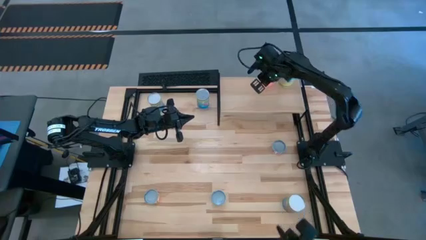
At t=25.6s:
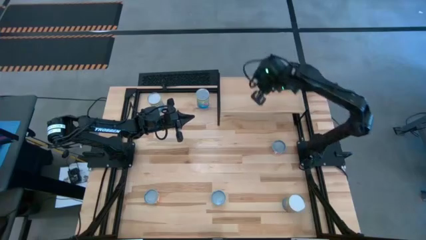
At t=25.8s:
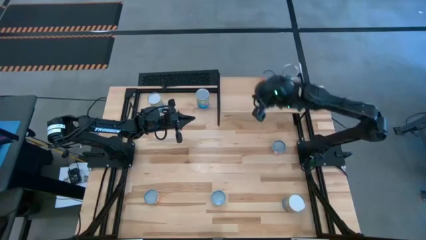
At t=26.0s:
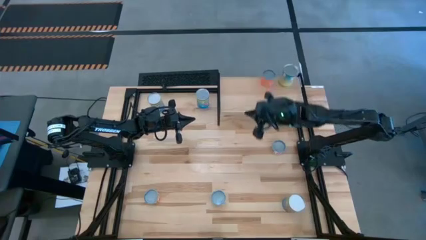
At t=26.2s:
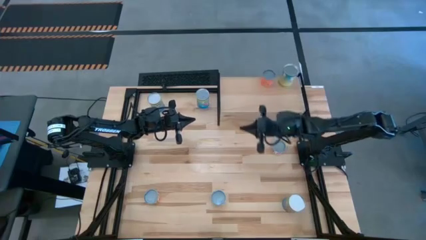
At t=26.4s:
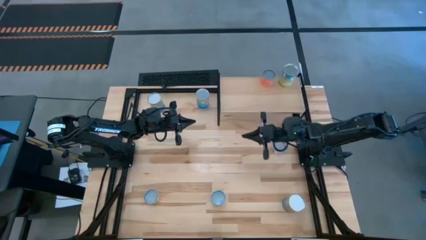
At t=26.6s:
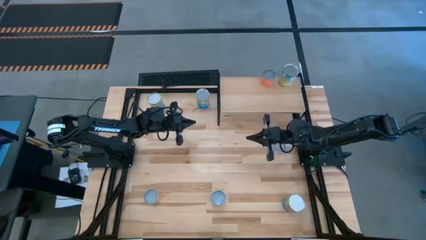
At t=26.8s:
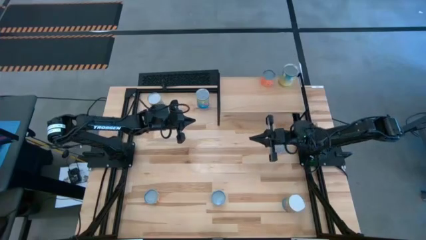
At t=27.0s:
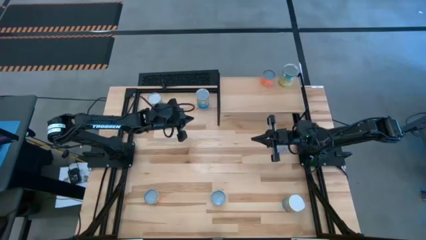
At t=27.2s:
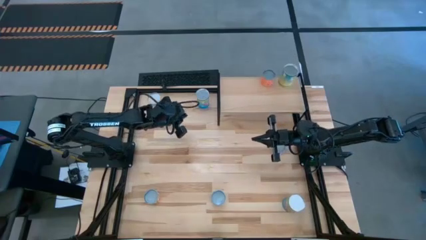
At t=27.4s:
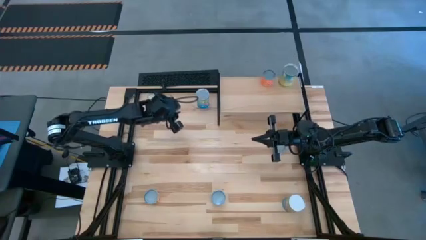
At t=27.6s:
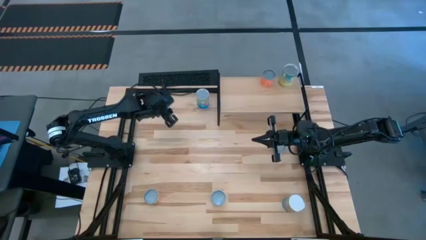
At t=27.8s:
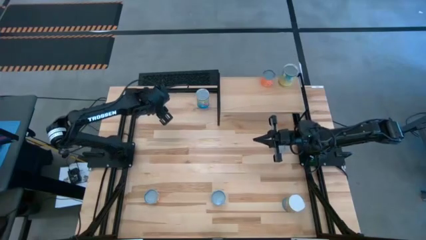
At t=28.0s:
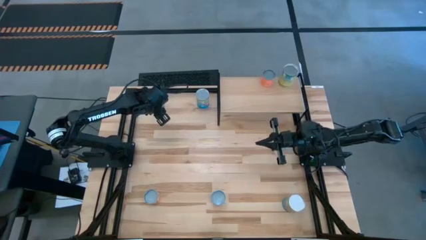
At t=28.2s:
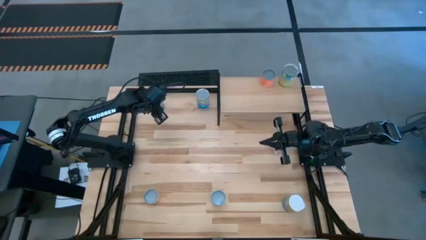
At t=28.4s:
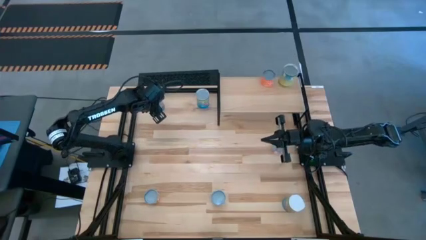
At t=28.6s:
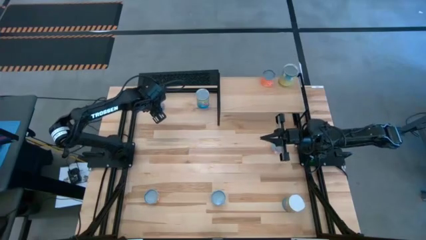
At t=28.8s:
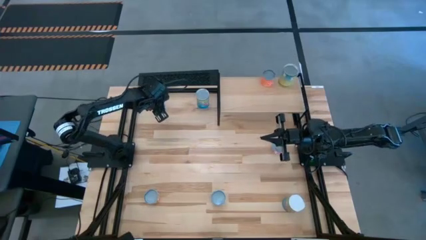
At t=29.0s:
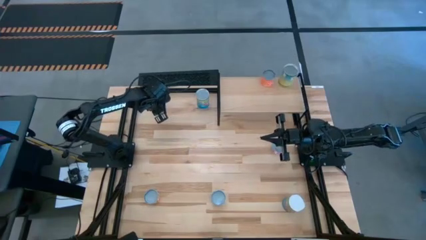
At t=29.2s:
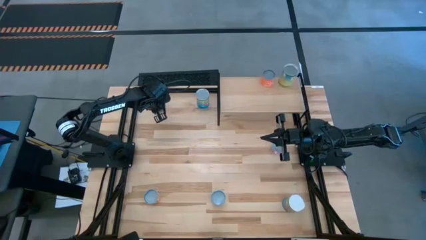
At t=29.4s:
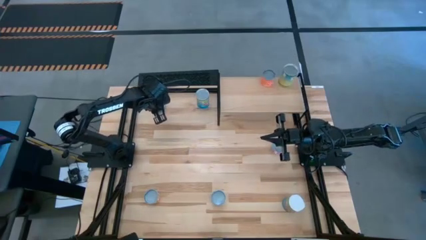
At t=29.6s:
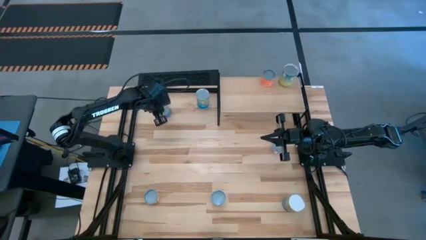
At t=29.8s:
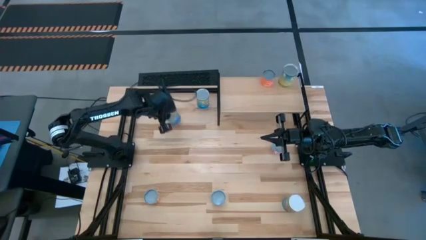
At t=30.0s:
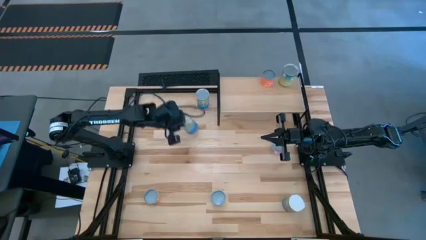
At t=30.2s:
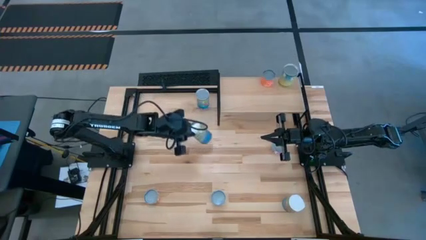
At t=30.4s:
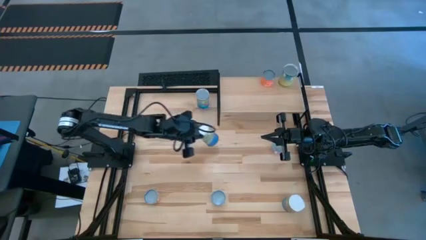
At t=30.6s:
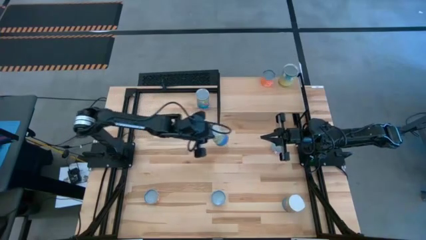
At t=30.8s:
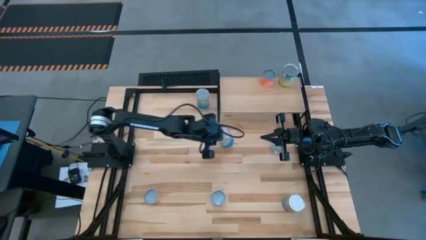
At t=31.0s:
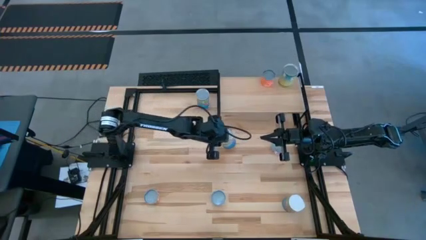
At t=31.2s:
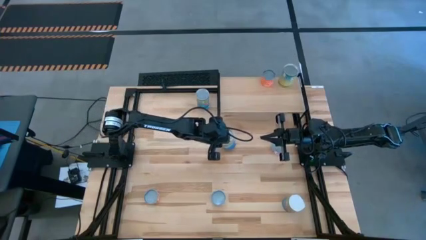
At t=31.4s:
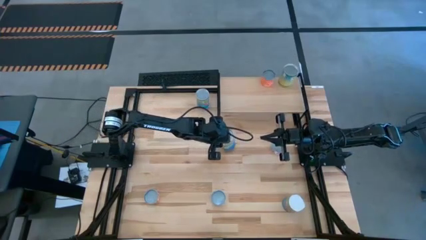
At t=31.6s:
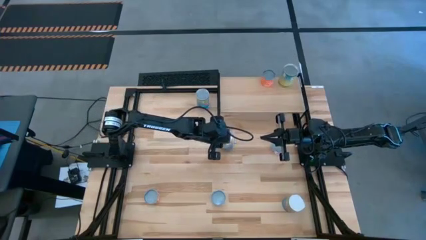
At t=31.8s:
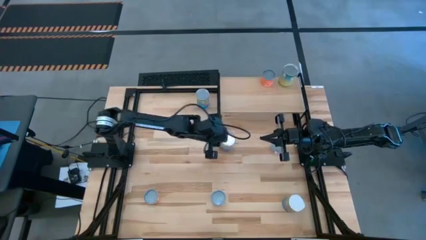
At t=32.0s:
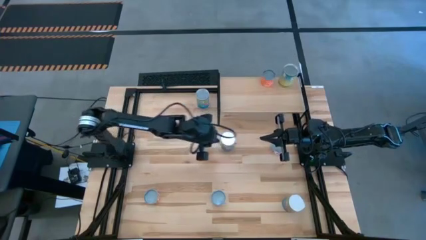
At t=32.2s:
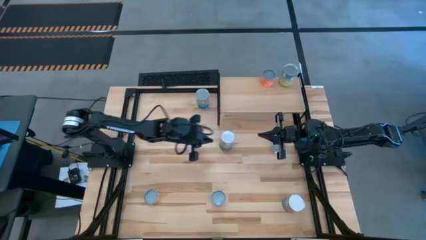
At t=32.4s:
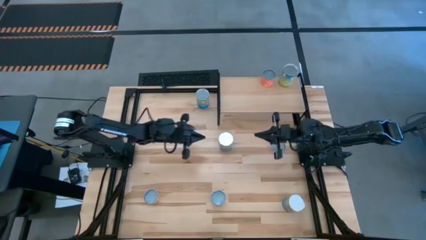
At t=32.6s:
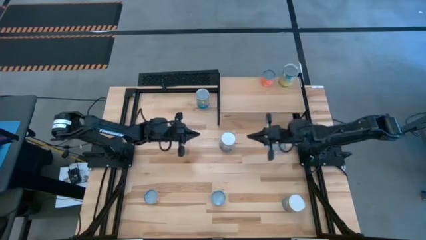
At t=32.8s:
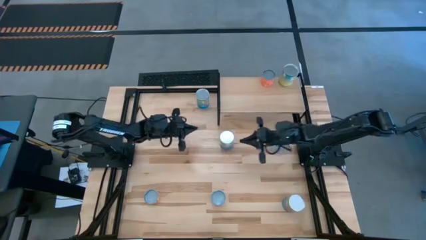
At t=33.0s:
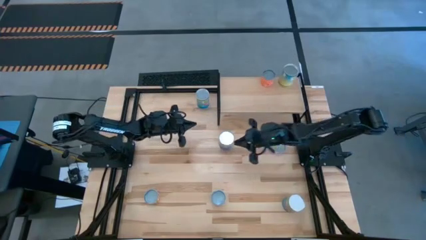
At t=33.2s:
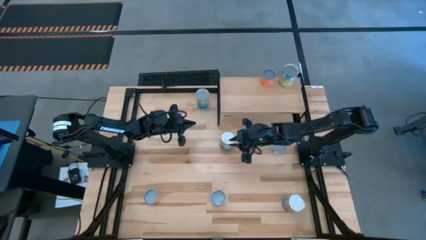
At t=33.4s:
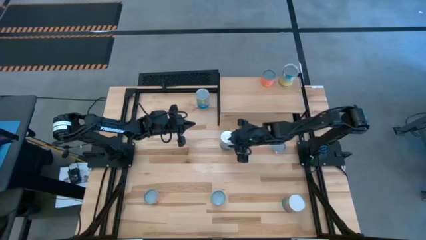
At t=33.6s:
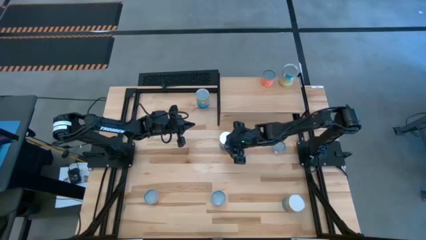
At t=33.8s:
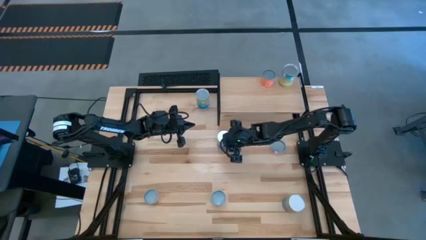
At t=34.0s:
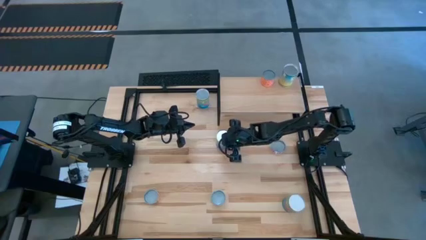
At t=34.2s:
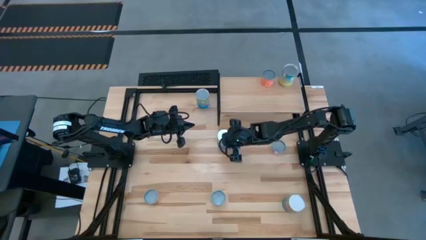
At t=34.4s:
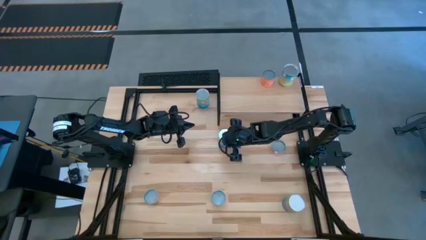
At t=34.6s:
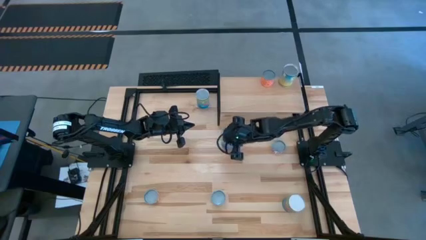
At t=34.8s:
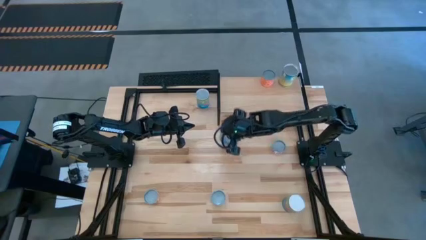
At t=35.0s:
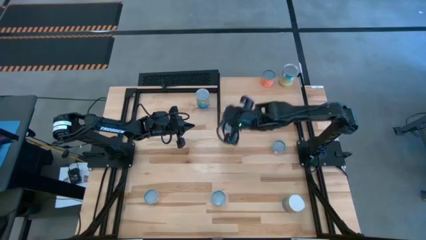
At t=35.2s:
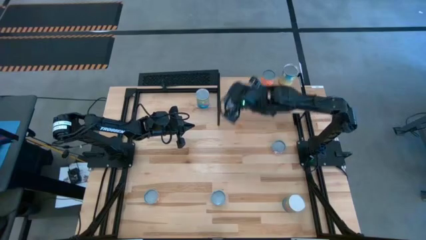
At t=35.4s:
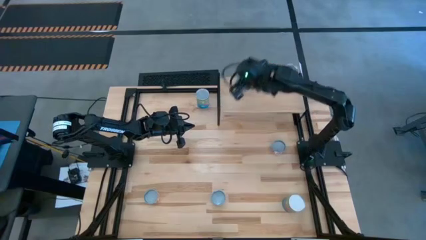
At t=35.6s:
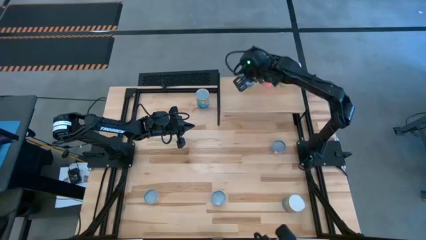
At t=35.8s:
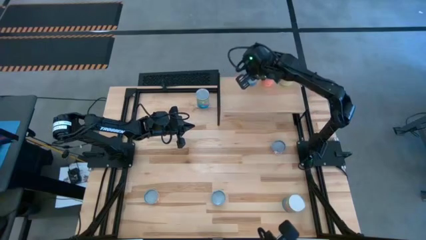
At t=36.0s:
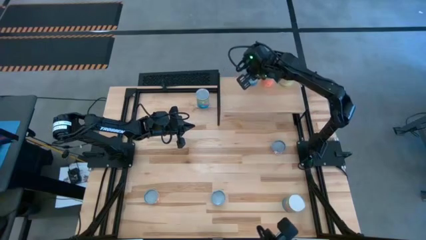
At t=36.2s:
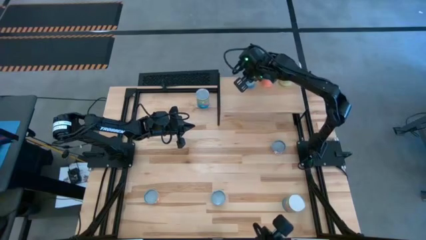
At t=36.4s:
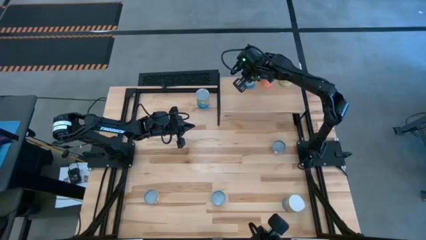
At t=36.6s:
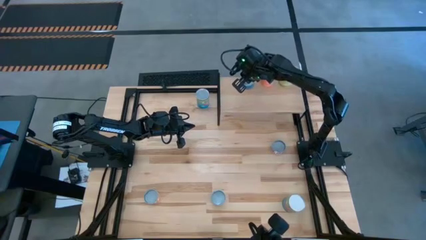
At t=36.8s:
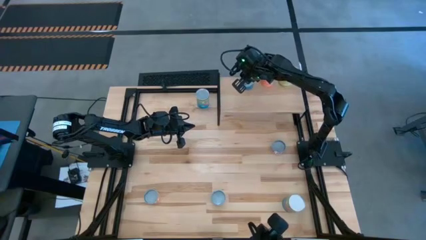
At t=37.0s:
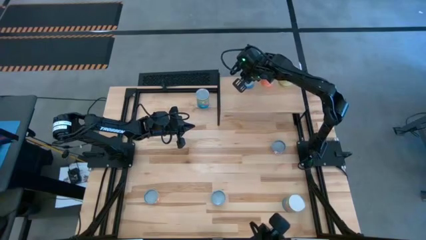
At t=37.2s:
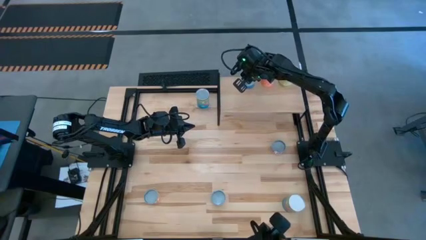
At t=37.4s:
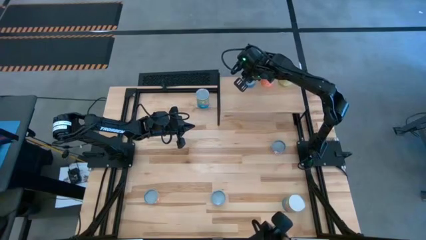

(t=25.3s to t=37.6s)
Task: Pick and place cans onto a shelf
Put the canned peas on the shelf

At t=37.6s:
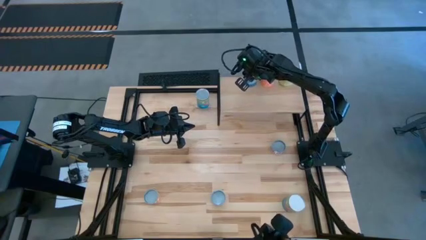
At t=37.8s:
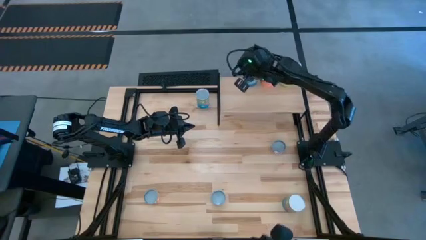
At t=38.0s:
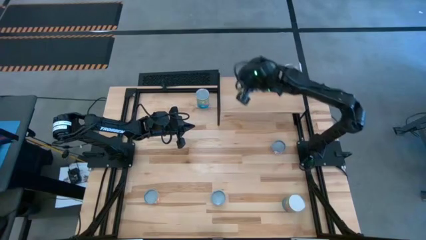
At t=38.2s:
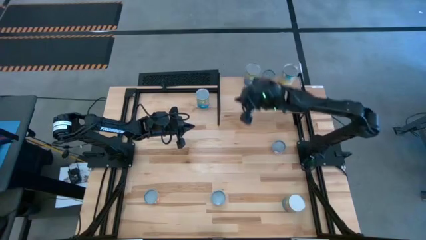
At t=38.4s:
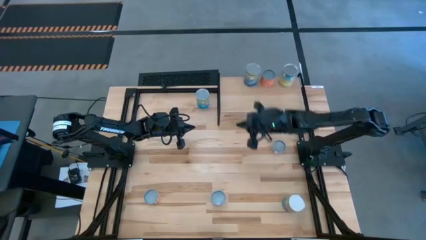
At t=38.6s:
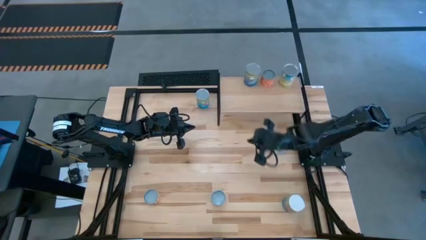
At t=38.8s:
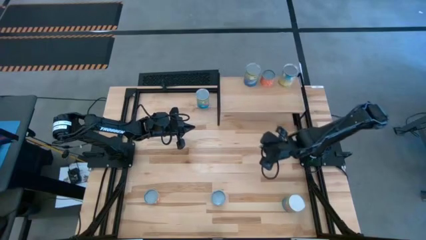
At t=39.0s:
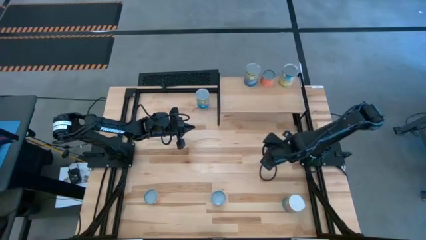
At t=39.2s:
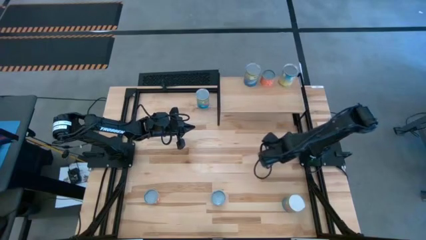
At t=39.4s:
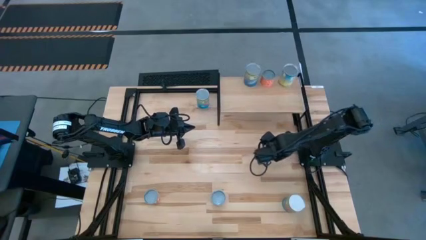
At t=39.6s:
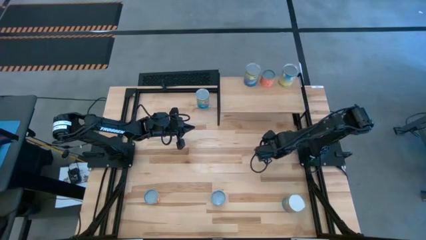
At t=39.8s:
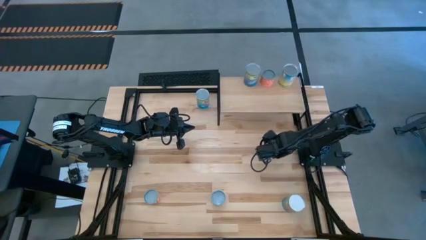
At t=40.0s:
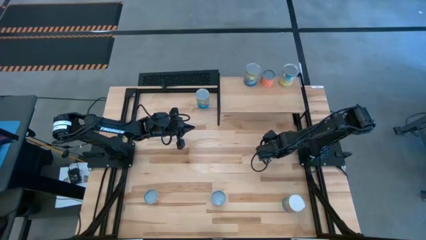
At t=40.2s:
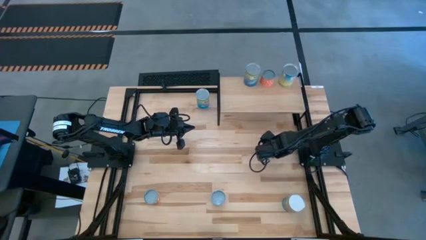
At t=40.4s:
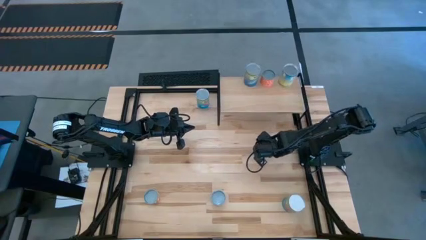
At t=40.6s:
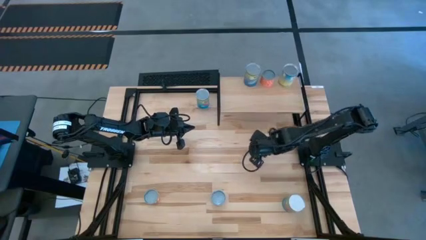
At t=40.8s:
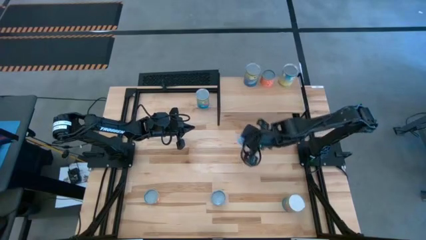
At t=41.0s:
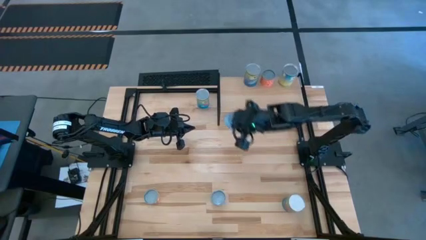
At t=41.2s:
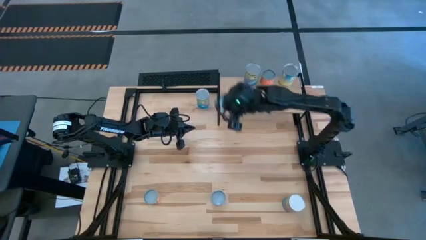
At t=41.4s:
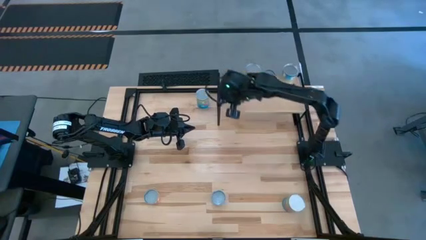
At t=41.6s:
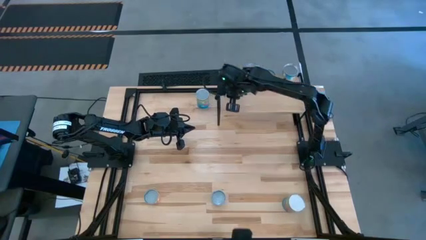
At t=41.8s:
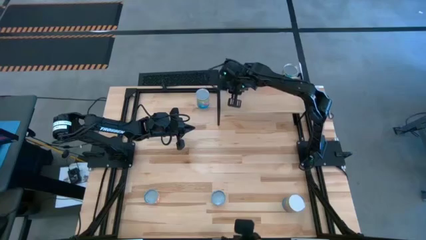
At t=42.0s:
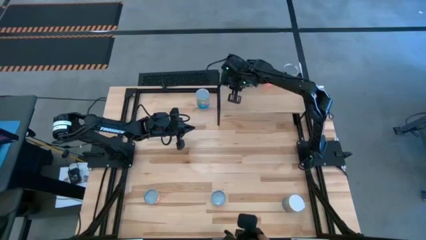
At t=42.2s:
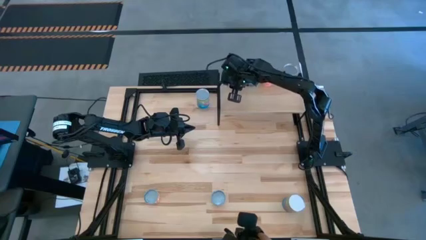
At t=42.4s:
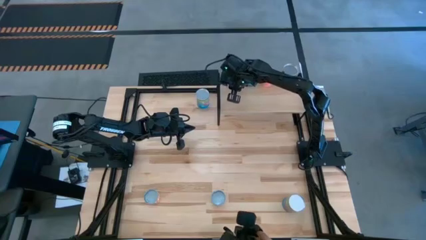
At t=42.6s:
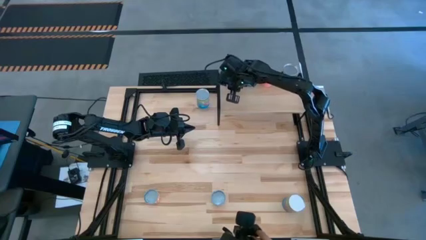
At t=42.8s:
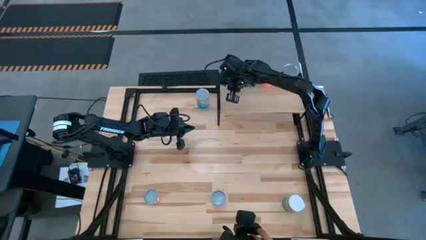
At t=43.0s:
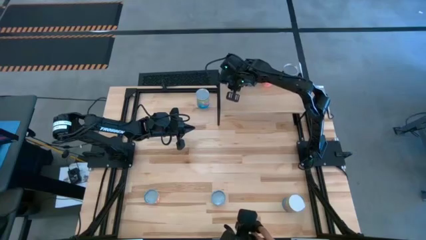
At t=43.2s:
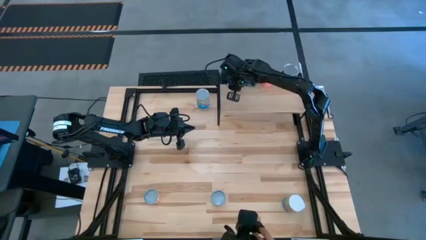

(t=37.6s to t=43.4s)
Put the canned salmon on the shelf
